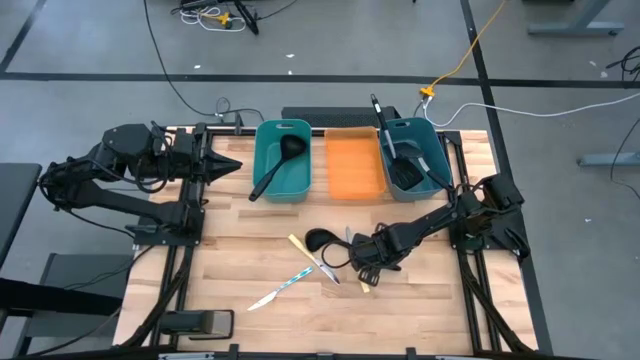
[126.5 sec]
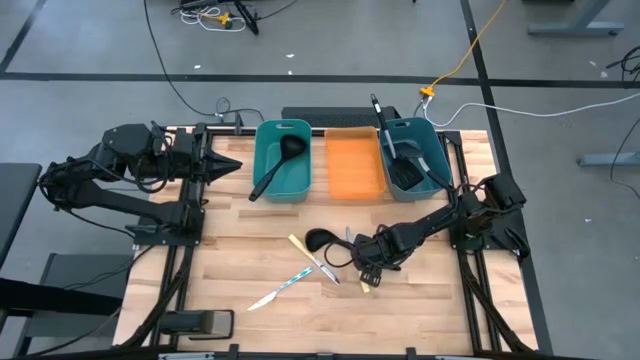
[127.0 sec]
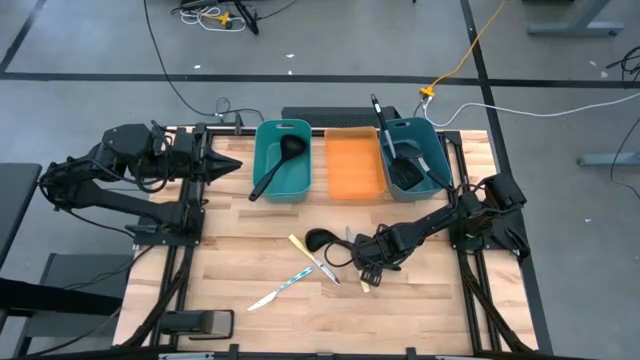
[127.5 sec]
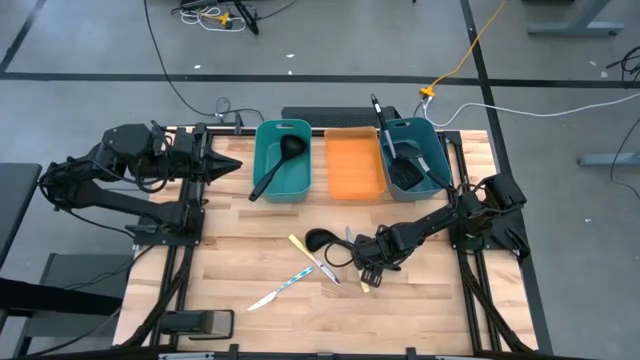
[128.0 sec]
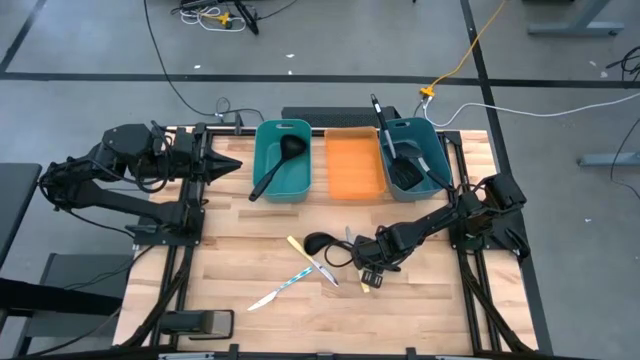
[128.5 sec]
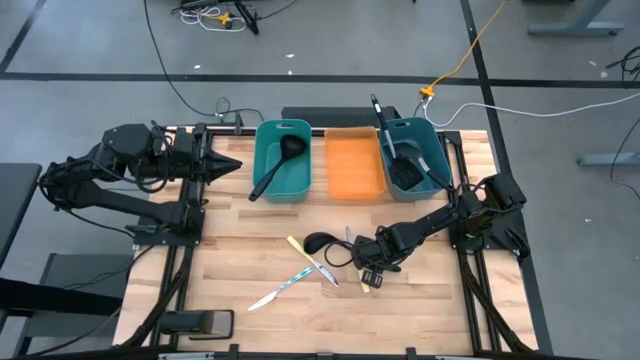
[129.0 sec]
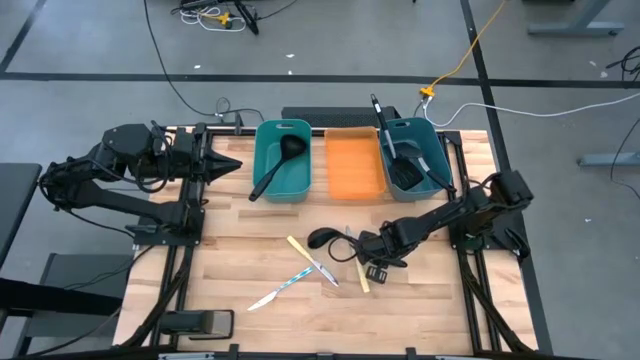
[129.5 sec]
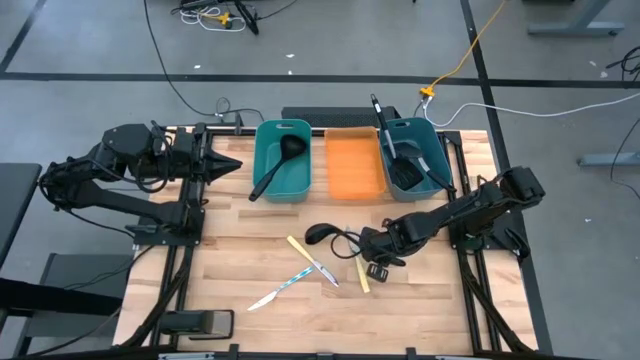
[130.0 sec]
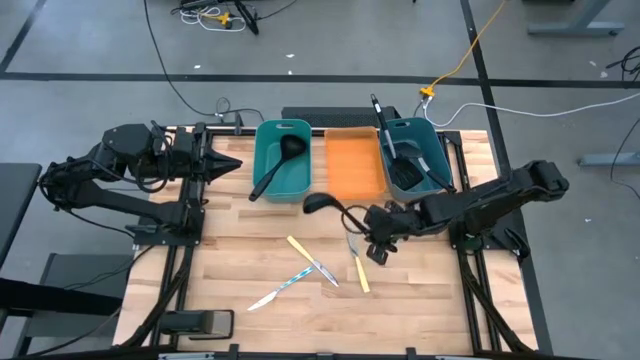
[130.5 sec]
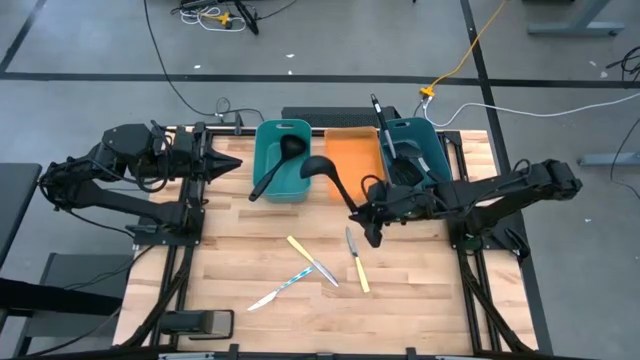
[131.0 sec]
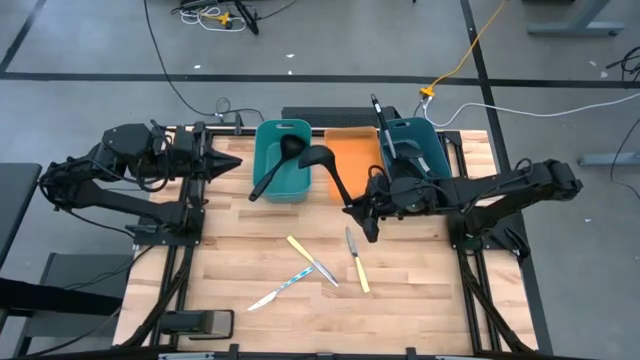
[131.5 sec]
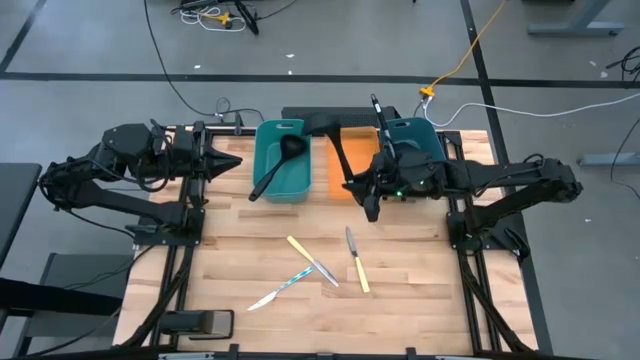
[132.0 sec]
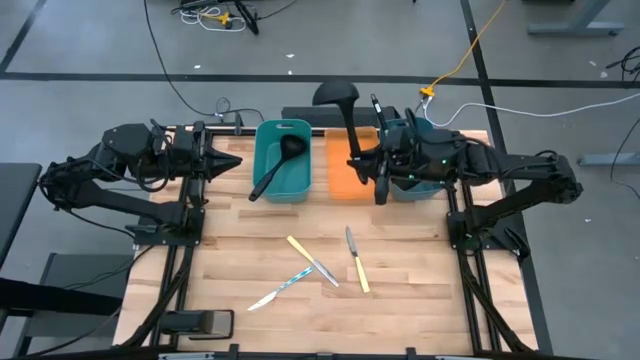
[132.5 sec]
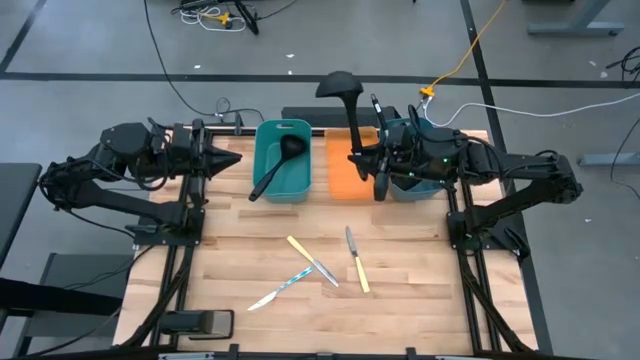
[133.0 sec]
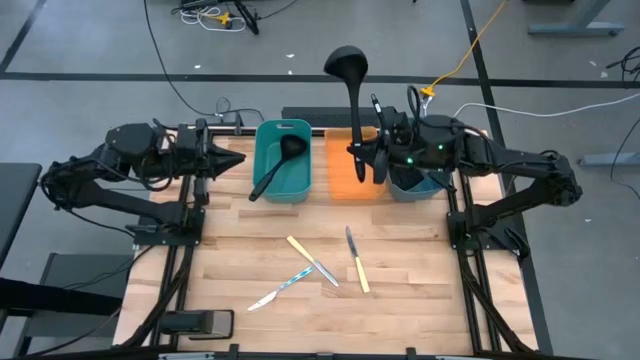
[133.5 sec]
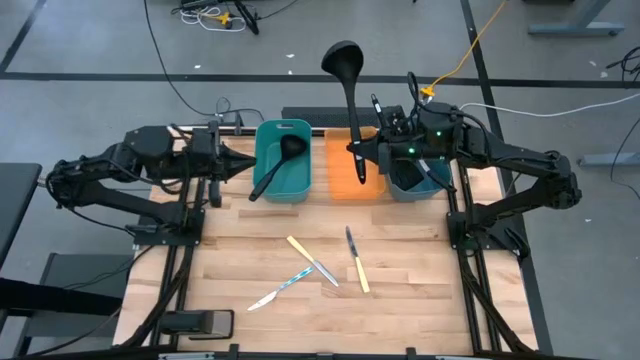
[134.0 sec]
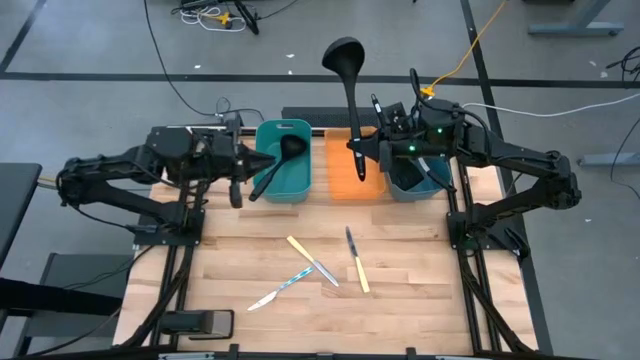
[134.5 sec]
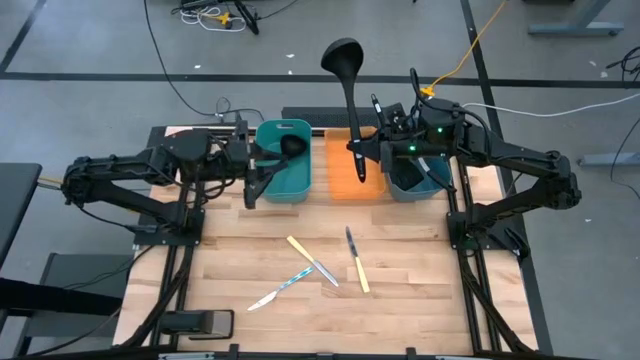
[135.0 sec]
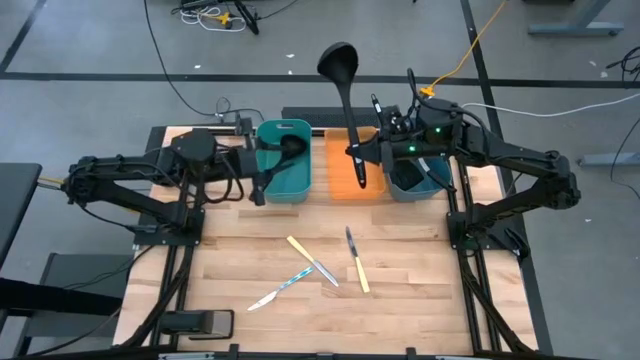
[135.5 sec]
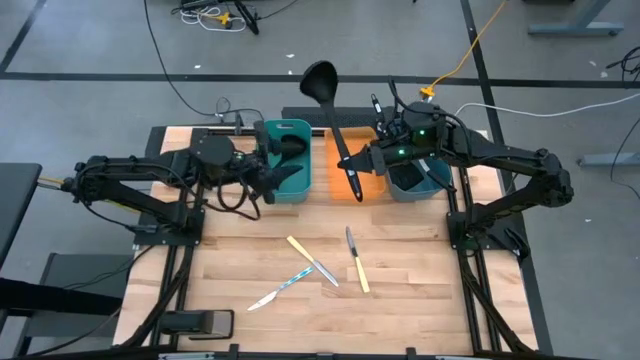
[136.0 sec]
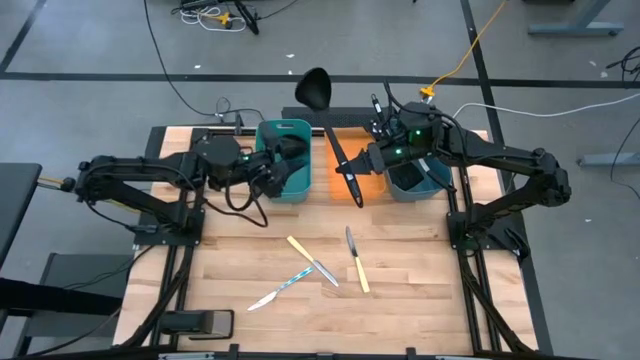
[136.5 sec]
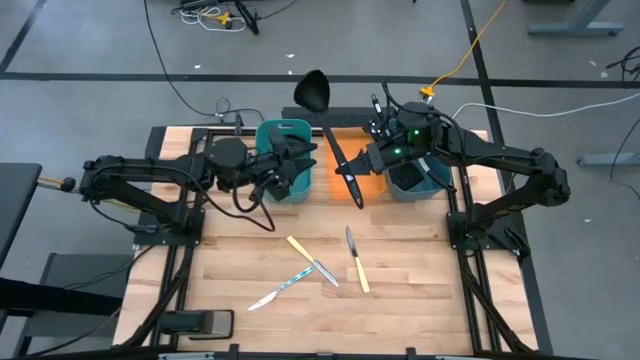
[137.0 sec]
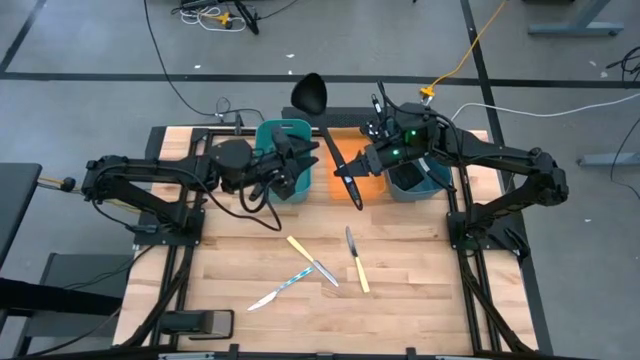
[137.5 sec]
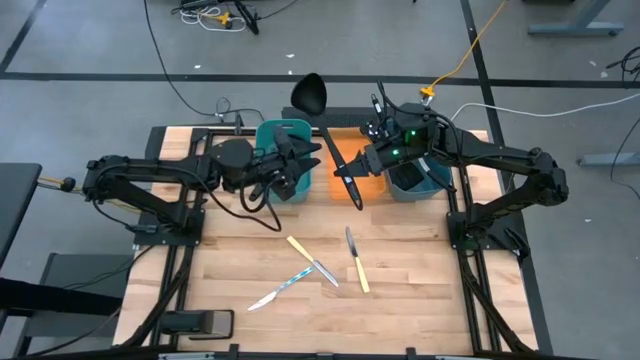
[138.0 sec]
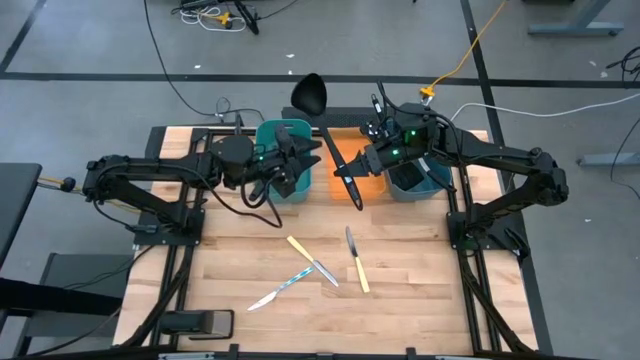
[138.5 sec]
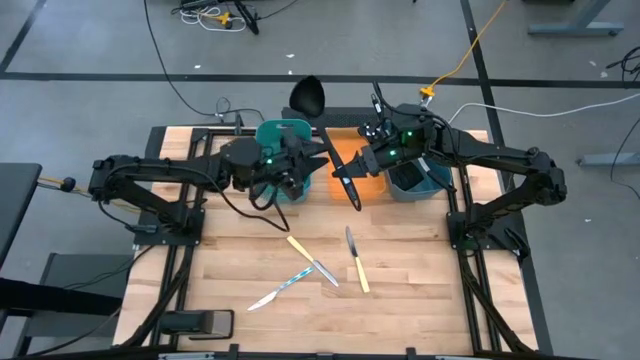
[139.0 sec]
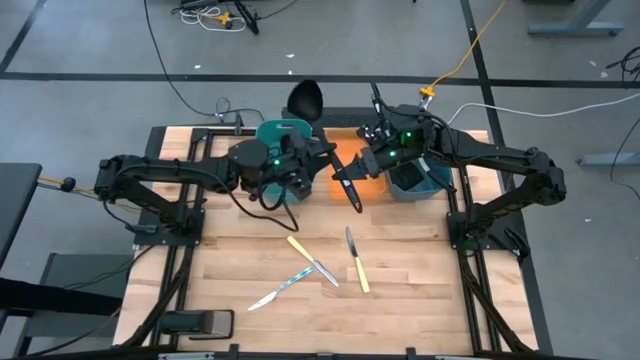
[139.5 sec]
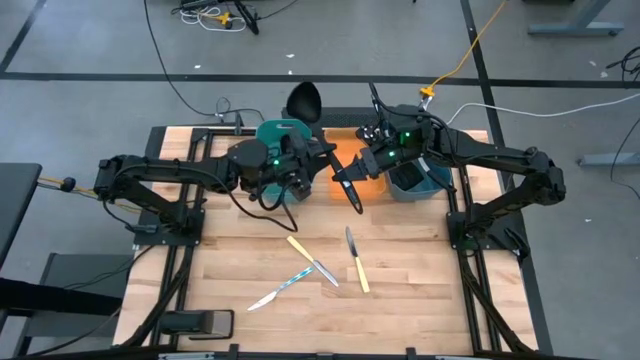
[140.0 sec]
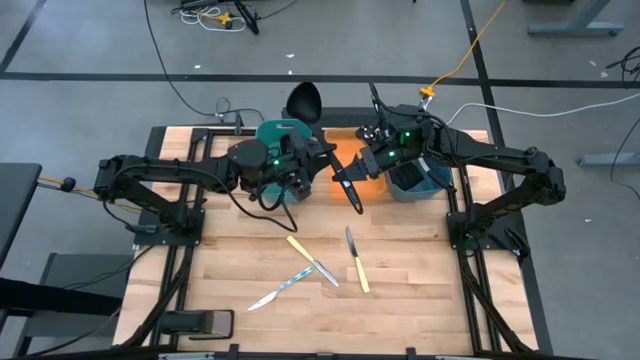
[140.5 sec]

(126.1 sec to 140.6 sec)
Task: Pick & Place Kitchen Items
Put the black serving spoon into the light green bin

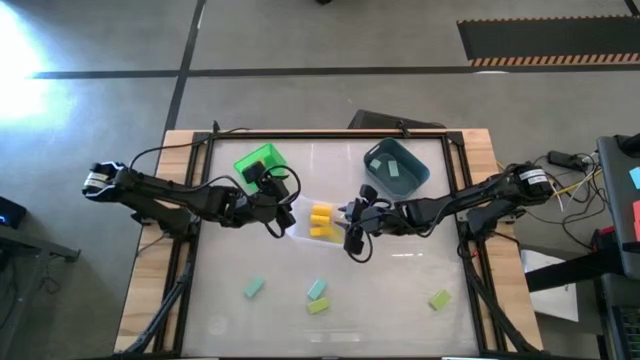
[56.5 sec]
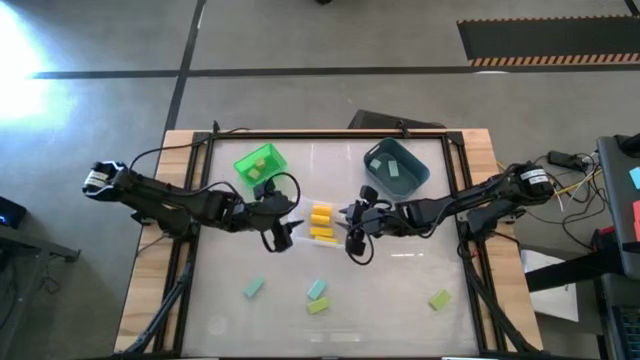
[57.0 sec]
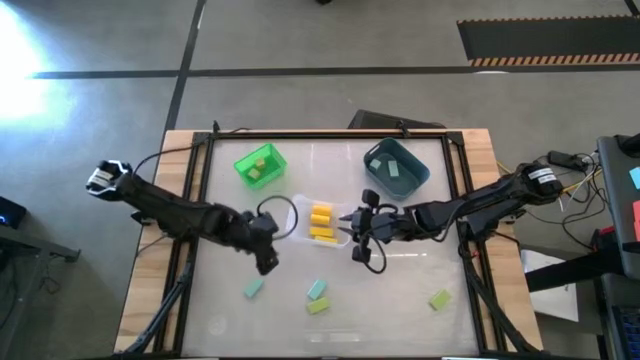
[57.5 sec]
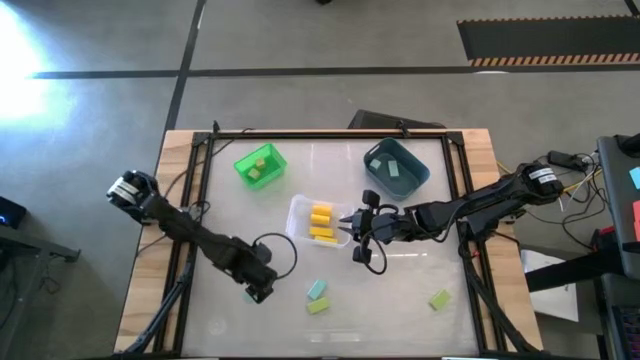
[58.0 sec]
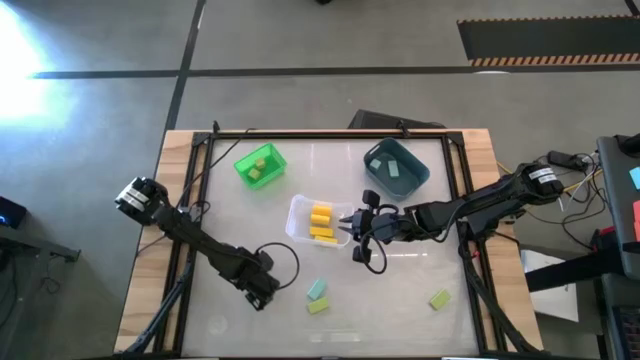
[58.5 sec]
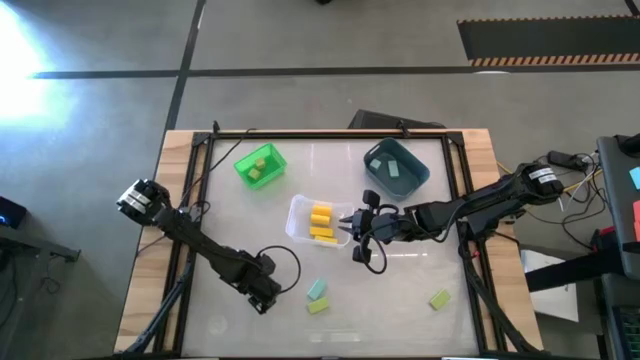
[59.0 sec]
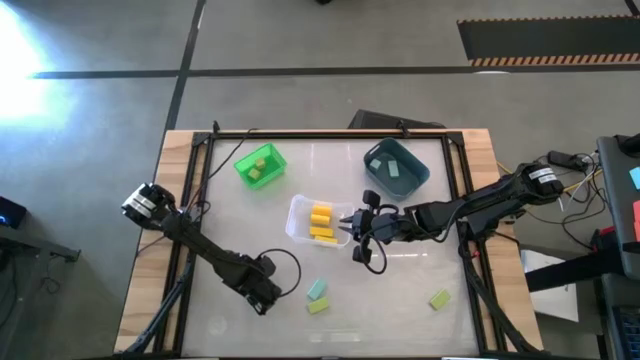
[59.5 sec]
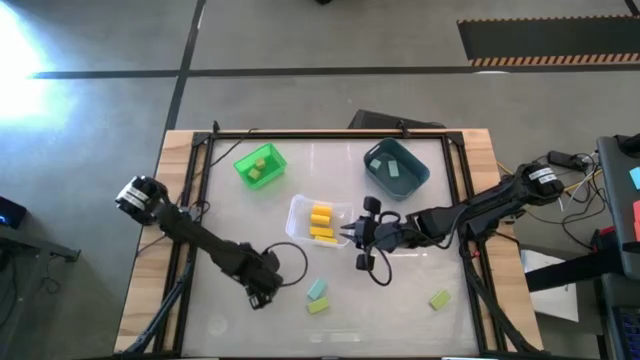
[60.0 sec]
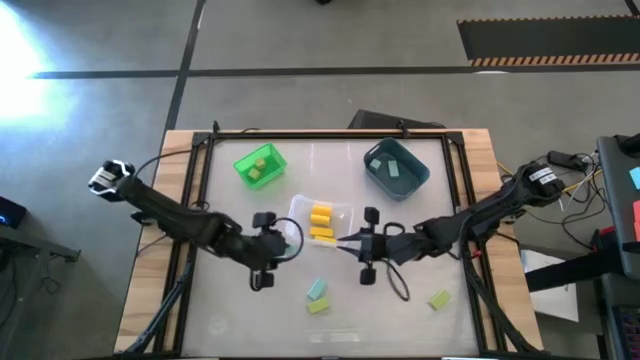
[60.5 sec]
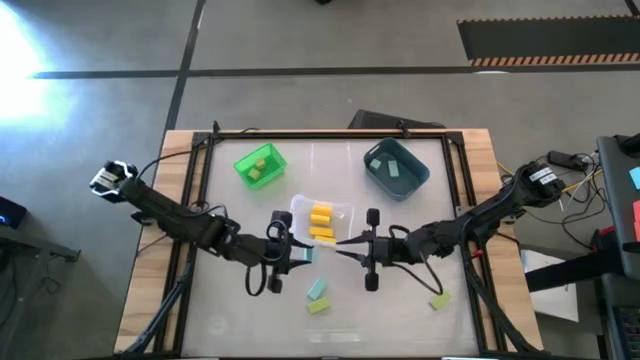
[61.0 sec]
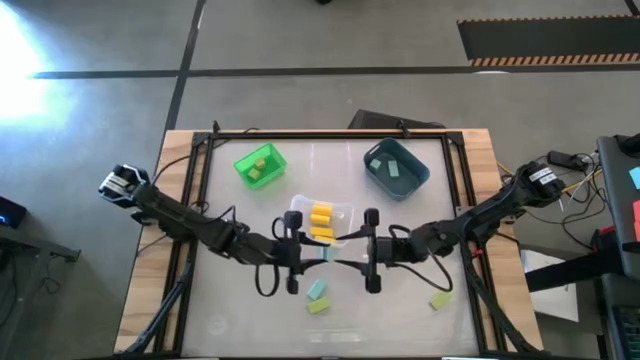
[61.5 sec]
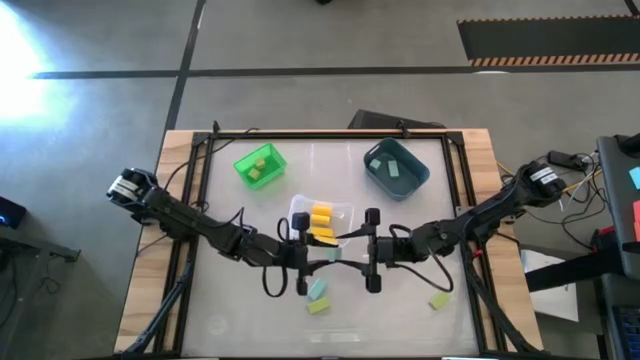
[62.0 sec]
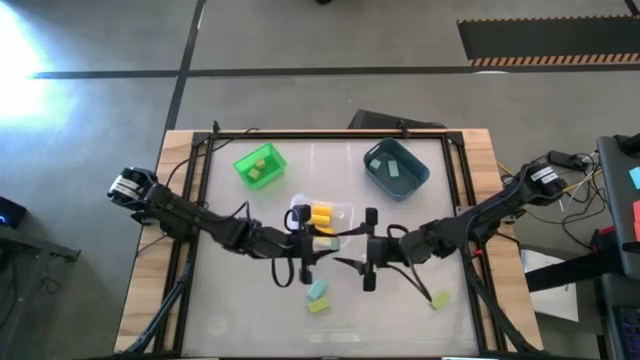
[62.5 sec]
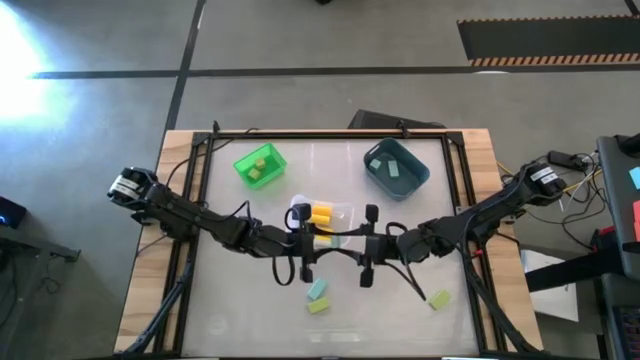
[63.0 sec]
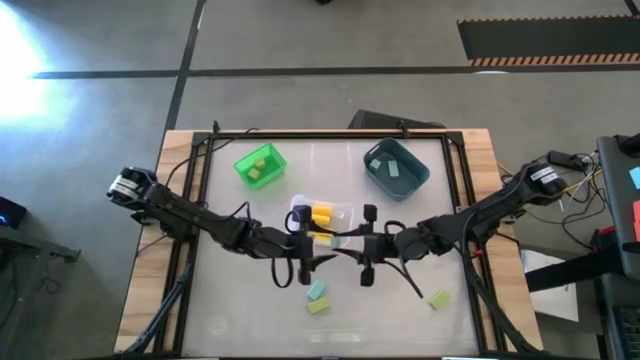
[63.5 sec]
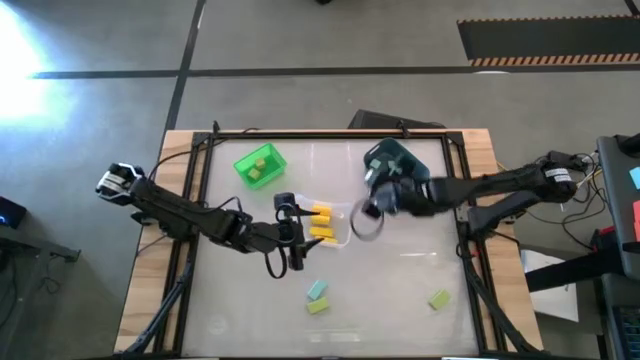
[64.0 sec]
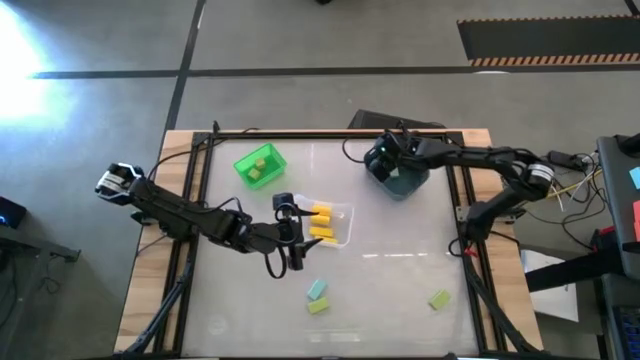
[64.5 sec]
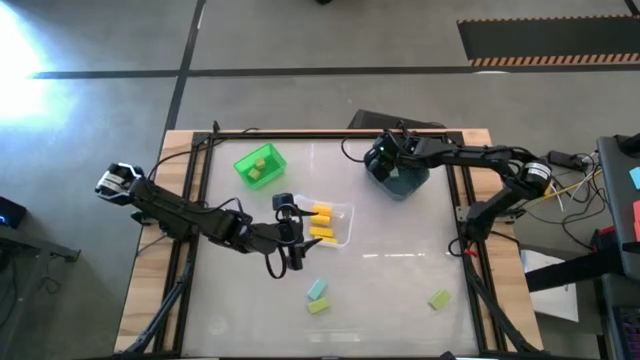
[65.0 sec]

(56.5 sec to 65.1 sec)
Task: Sort & place blocks by color
Put the blue block into the blue bin
